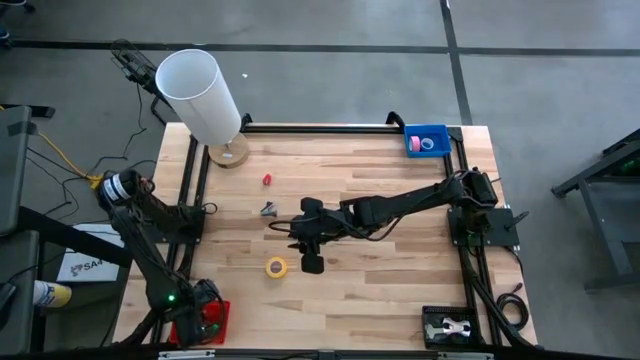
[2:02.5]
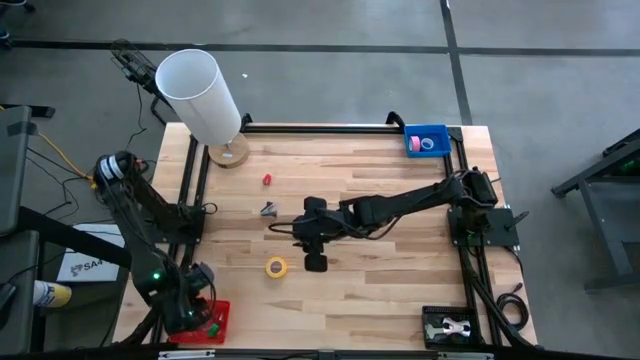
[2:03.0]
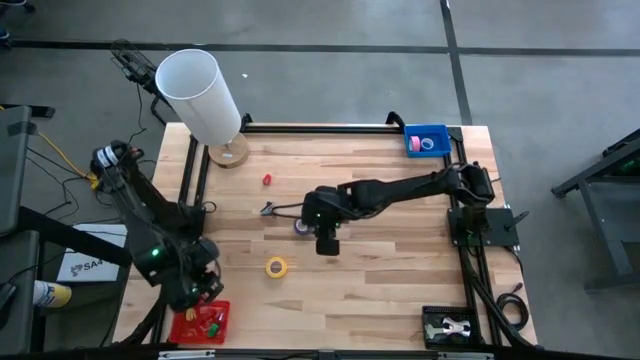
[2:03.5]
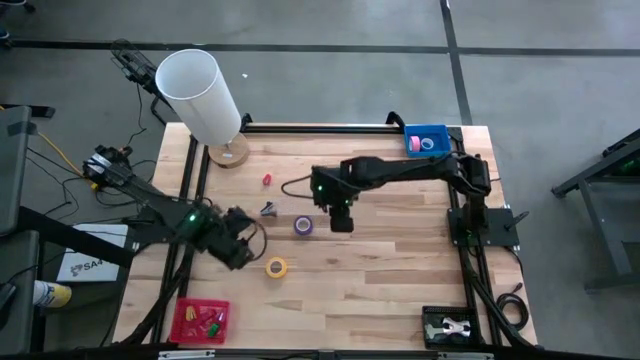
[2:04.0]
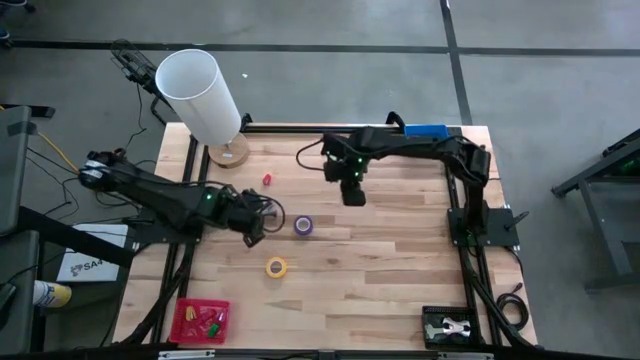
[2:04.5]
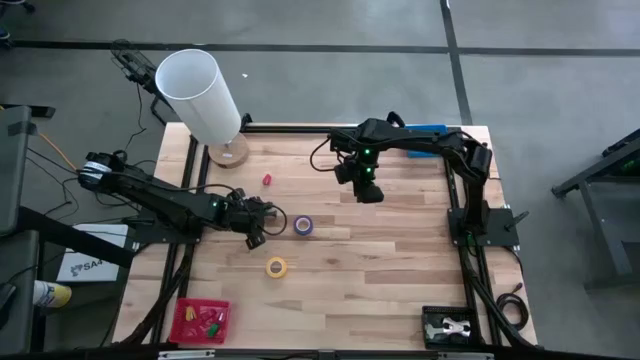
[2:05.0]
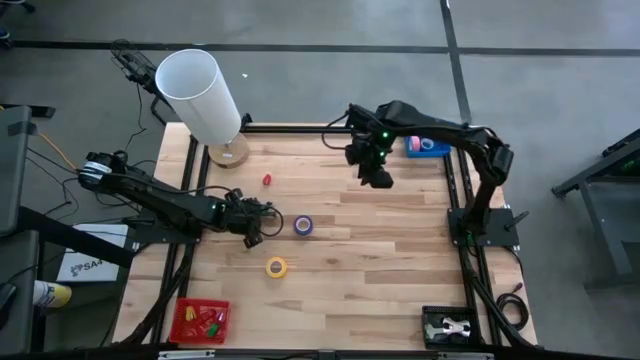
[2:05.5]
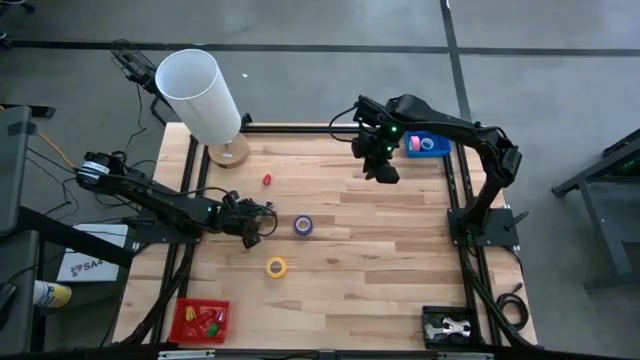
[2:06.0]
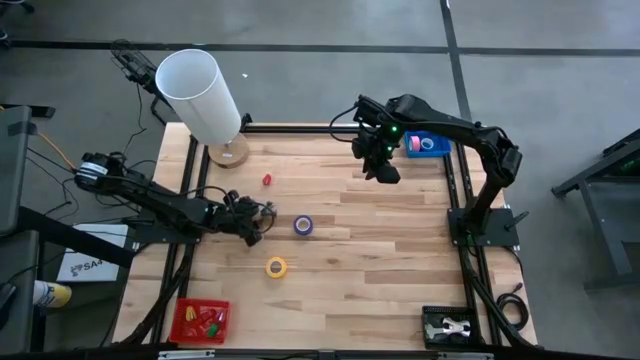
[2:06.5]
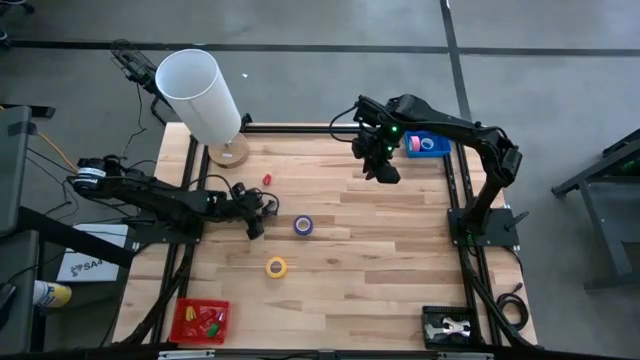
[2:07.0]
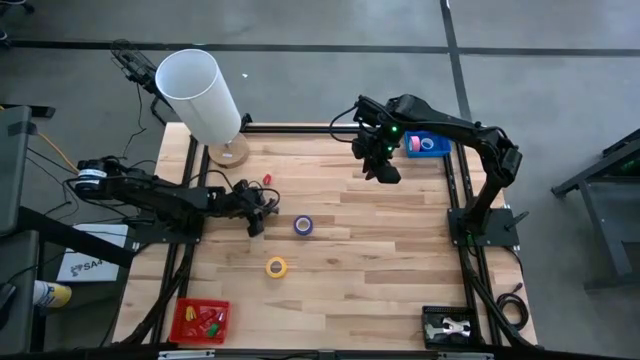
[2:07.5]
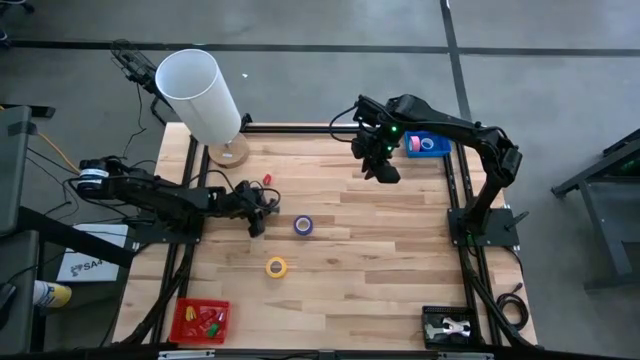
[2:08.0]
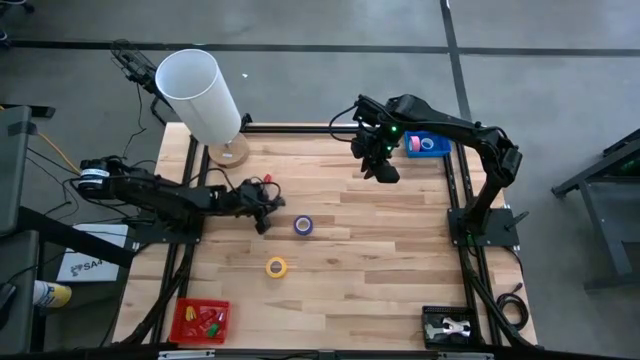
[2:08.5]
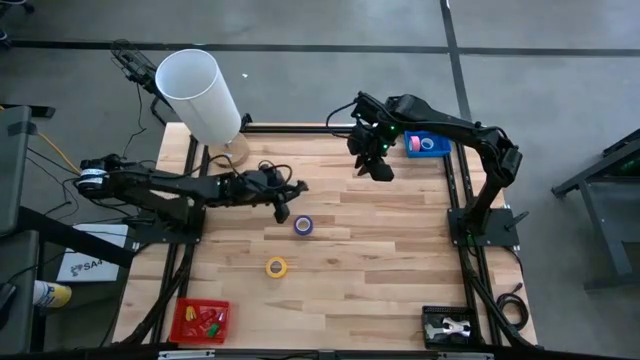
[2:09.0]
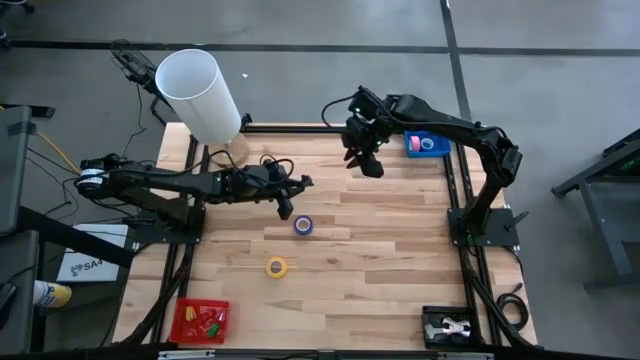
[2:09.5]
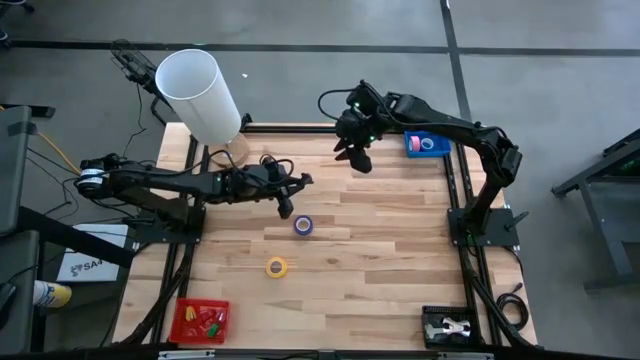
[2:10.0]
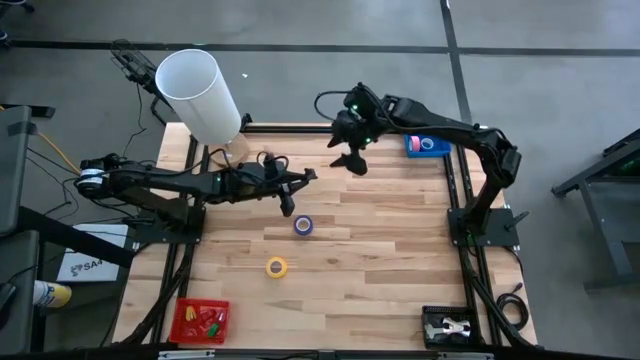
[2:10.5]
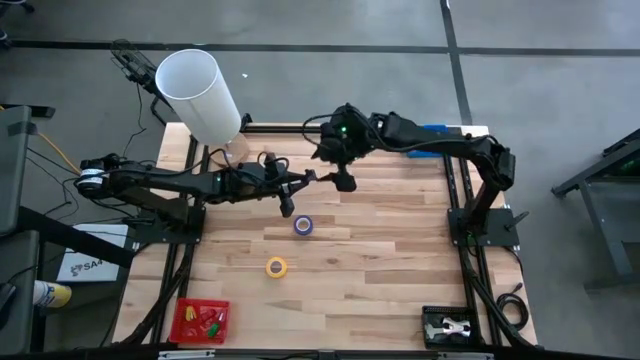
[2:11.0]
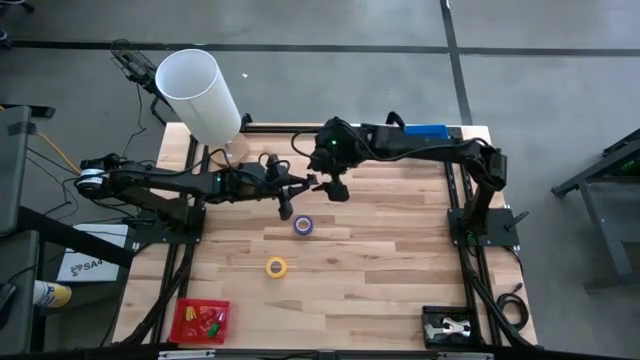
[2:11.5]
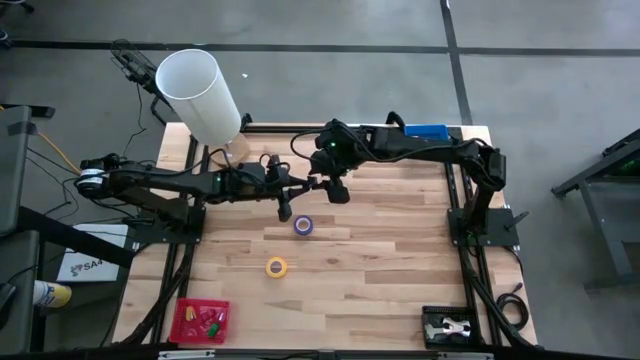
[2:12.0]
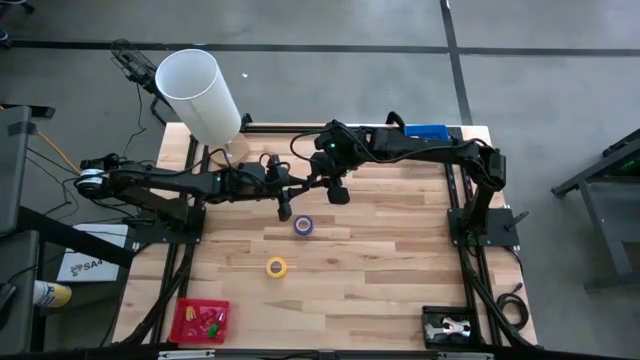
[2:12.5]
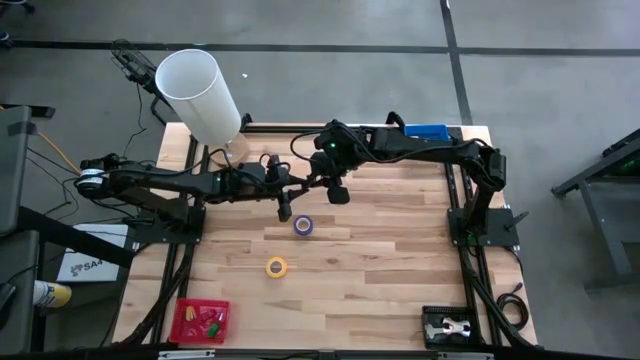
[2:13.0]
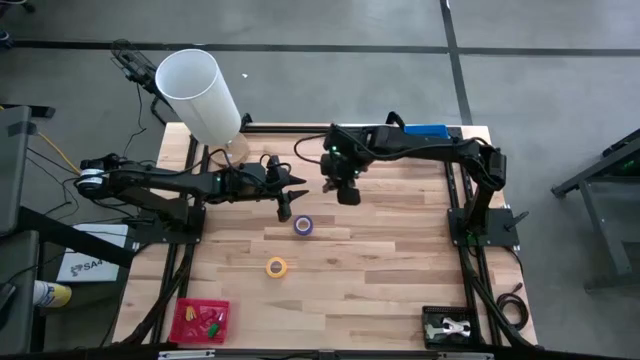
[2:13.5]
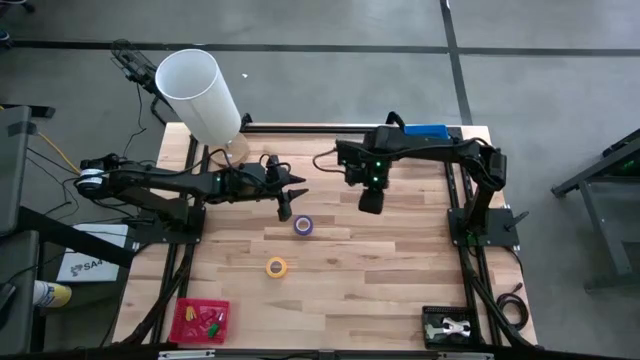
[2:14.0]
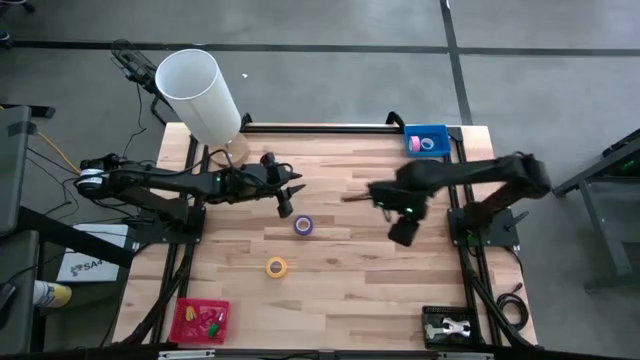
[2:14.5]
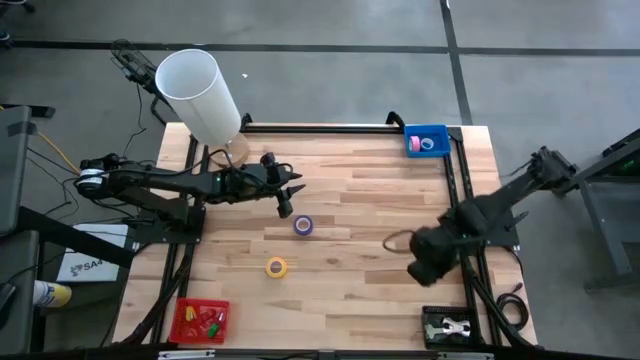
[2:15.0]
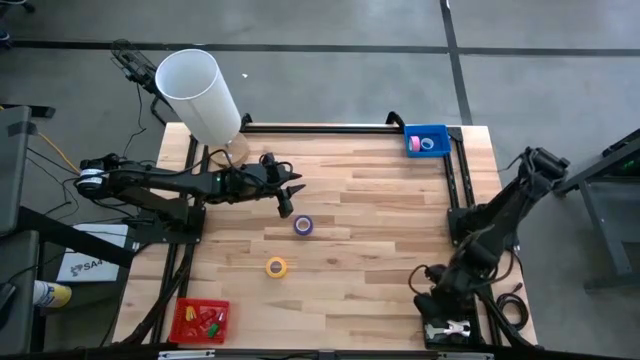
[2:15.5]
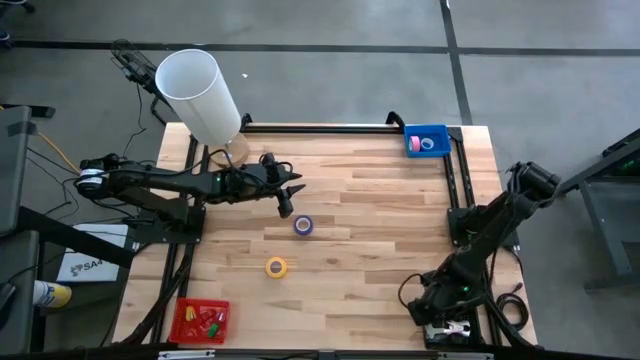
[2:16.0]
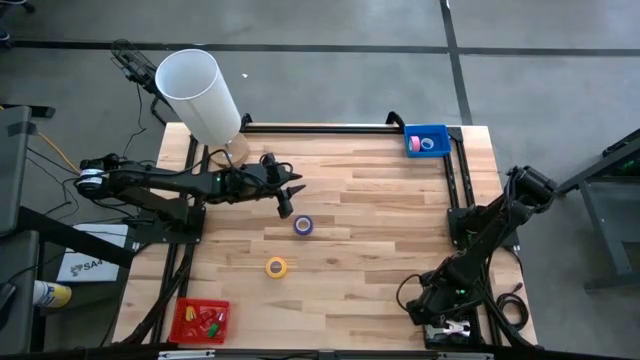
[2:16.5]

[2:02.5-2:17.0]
Task: Pick and place Stapler, Stapler remover, tape
Put the black staple remover into the black bin

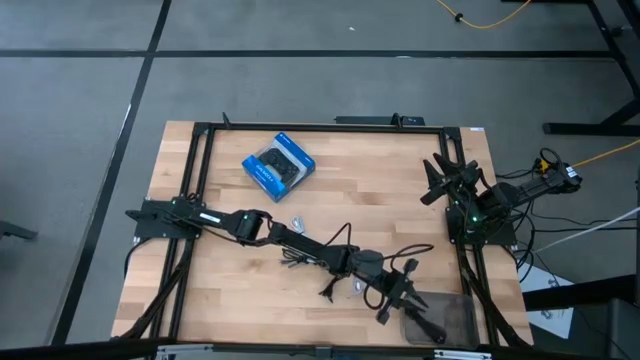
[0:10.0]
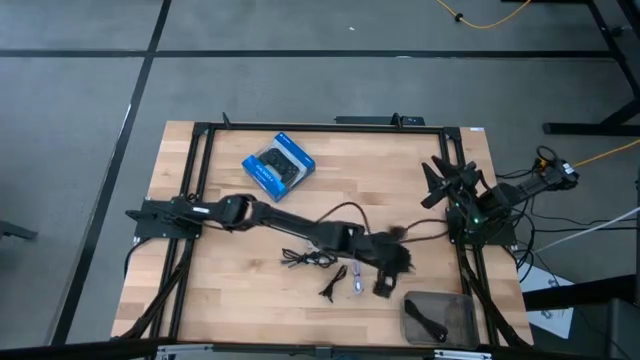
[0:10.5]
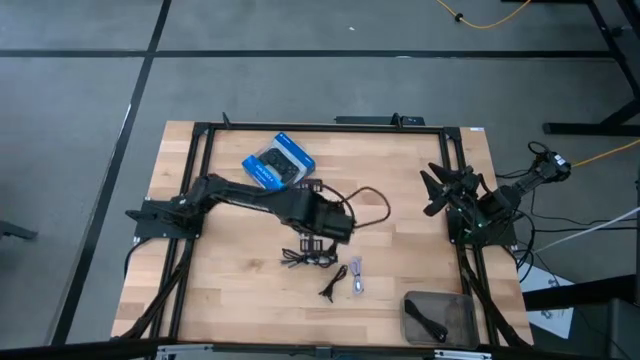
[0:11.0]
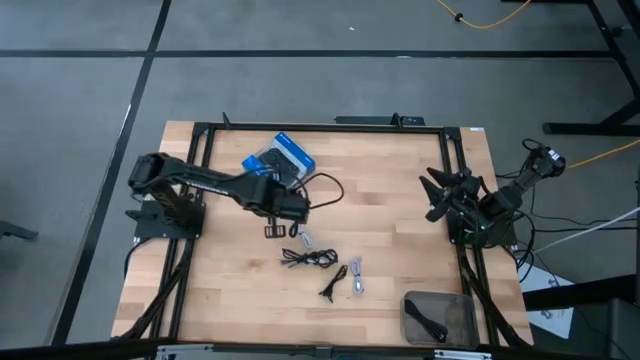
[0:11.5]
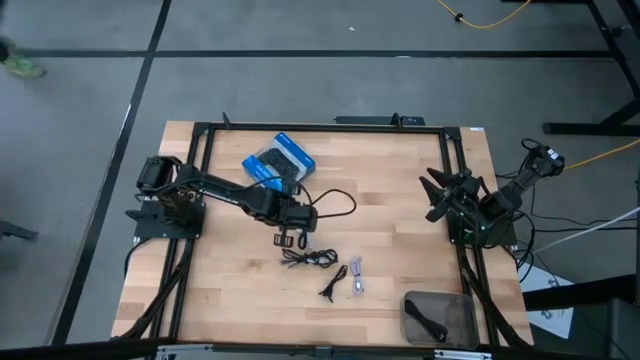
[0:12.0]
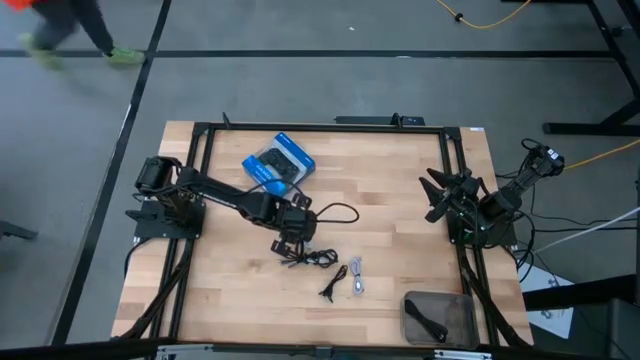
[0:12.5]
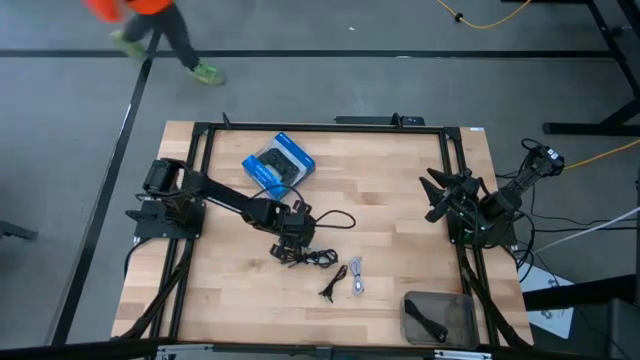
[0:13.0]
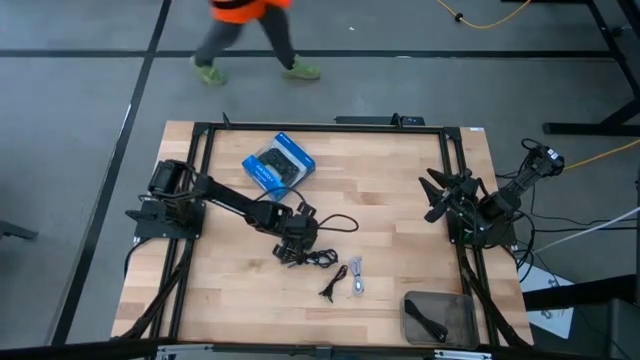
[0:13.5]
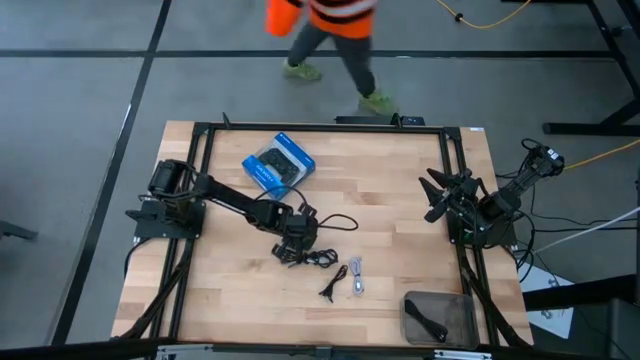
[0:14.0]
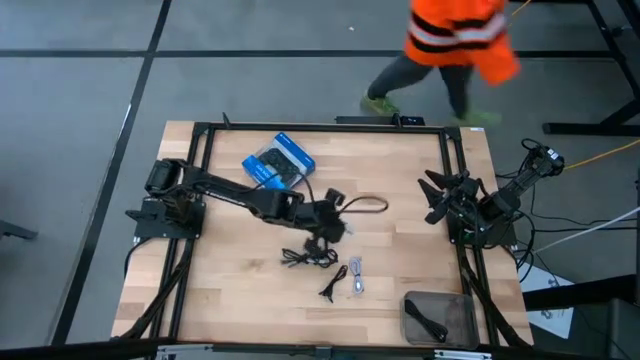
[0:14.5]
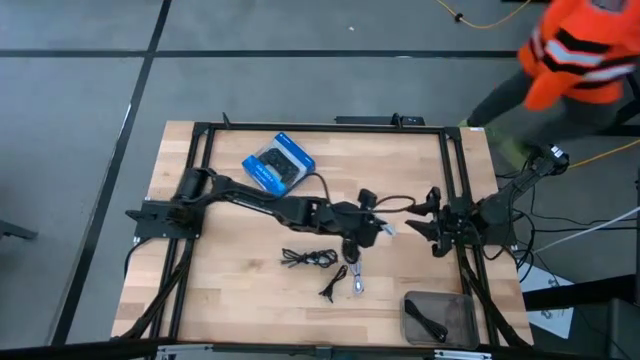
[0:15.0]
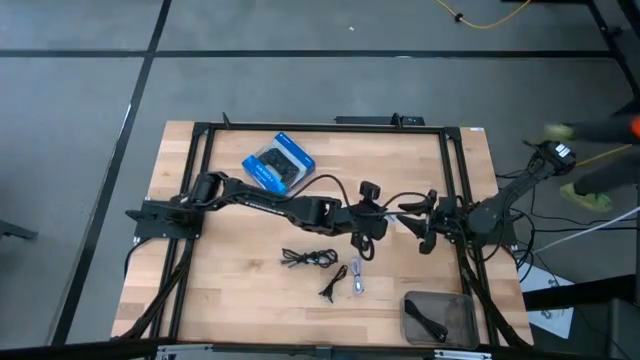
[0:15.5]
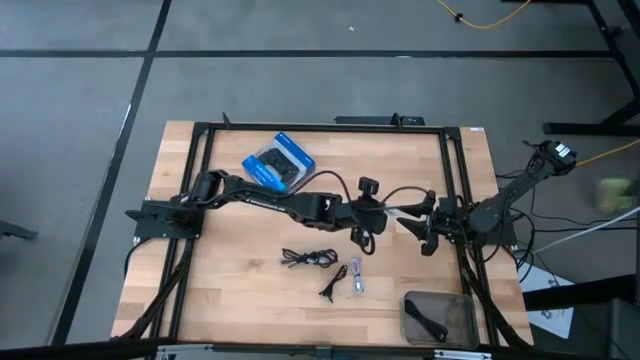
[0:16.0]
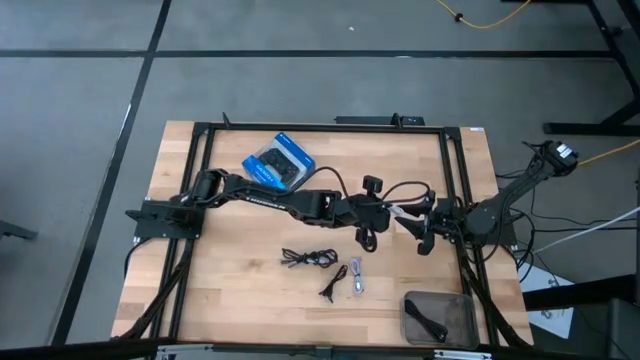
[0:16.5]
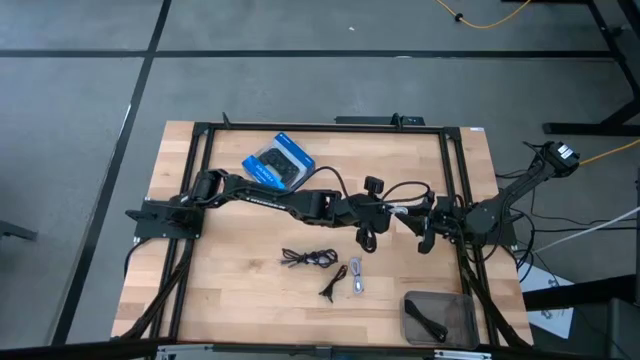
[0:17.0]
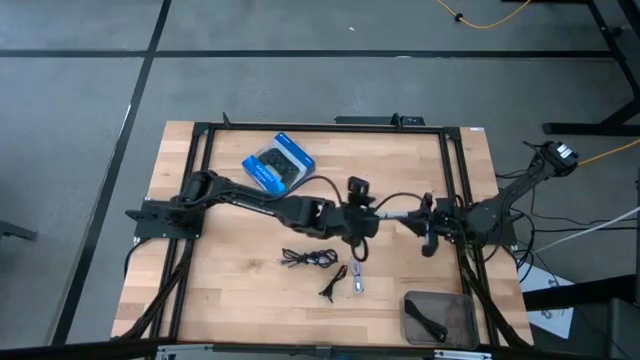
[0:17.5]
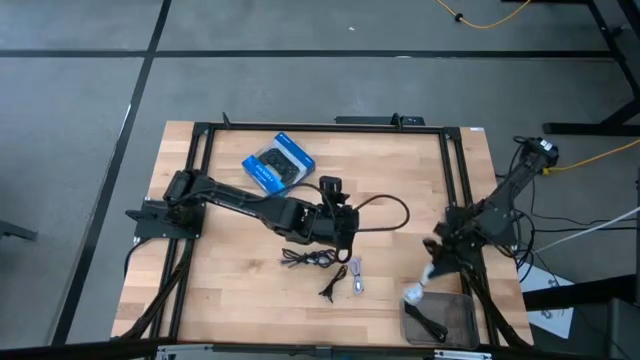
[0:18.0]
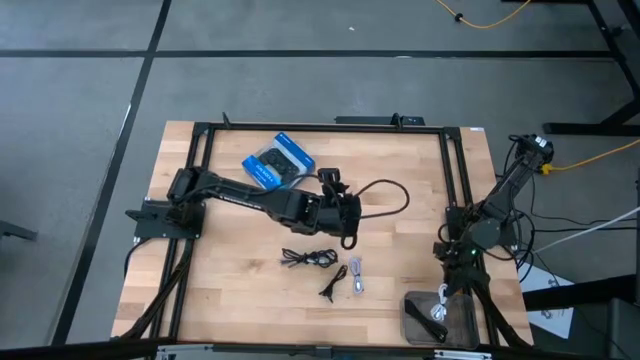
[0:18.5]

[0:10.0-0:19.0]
Task: Pick and place USB-C Cables
Put the left white charger cable into the black bin
